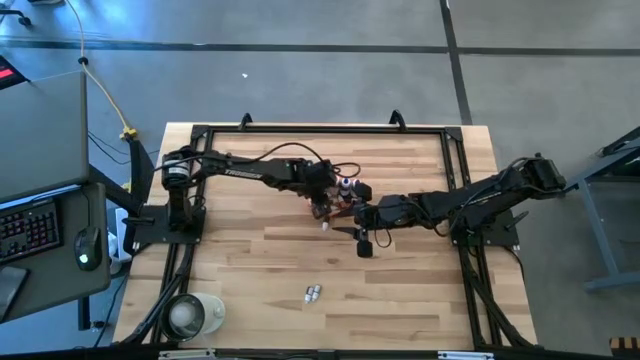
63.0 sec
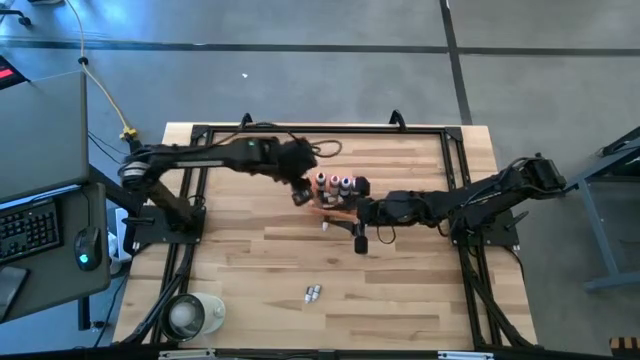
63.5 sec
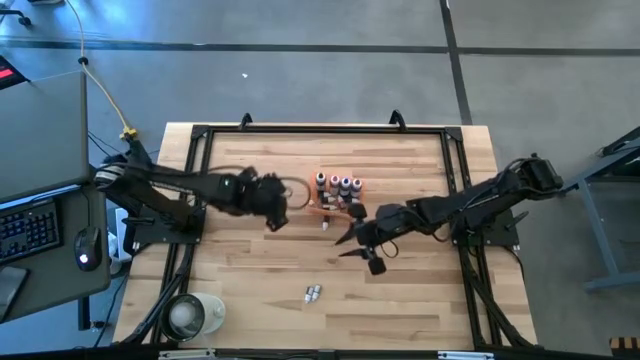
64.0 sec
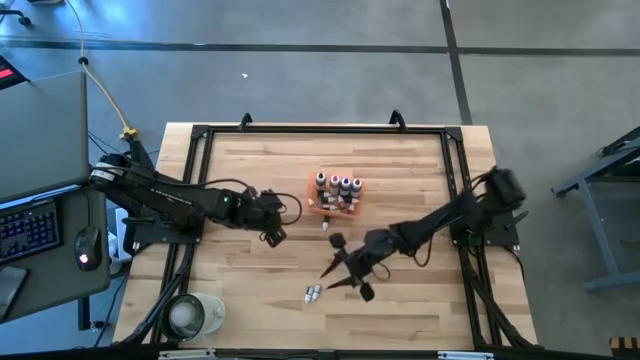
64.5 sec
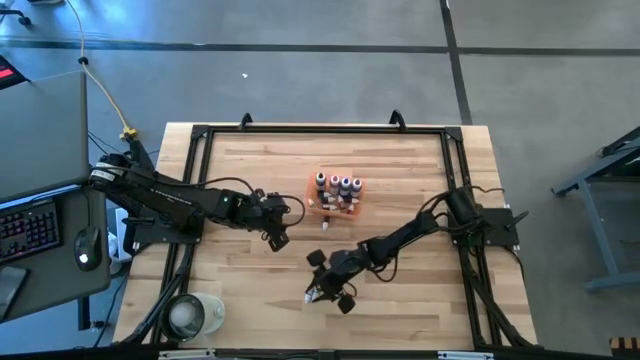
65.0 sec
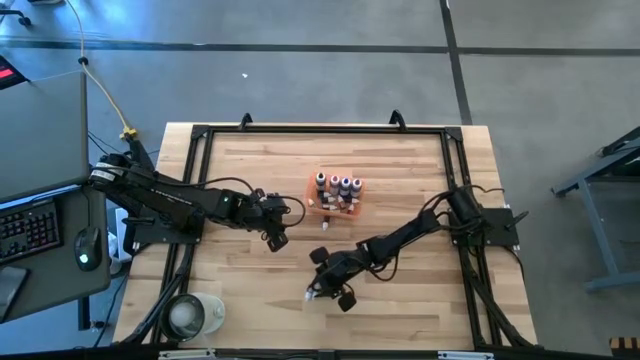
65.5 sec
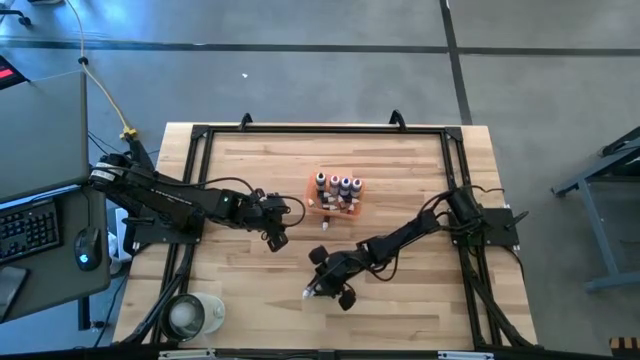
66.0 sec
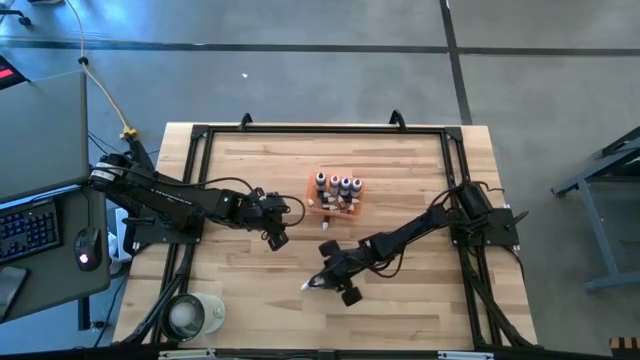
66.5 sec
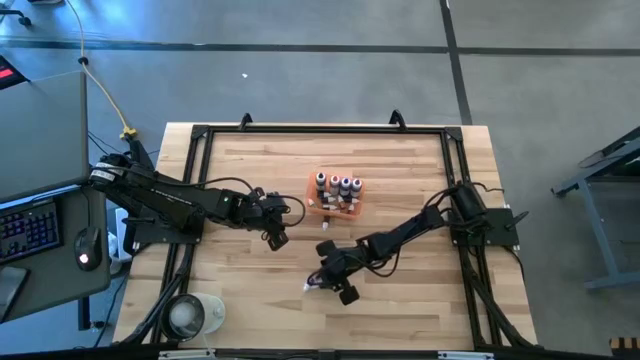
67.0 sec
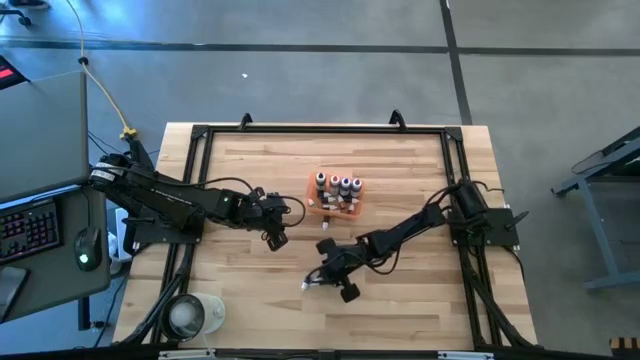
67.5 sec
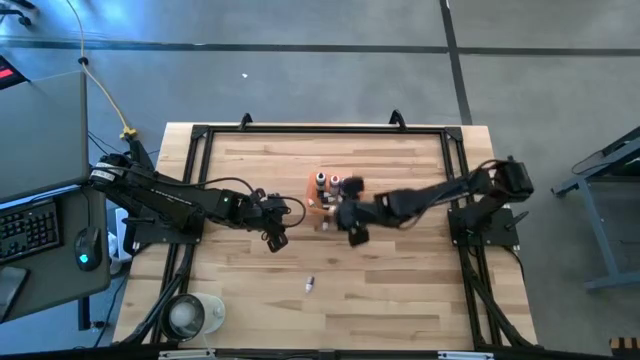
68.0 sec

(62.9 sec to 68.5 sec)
Task: Pick & Place food coloring
Put the small green food coloring bottle into the orange bin

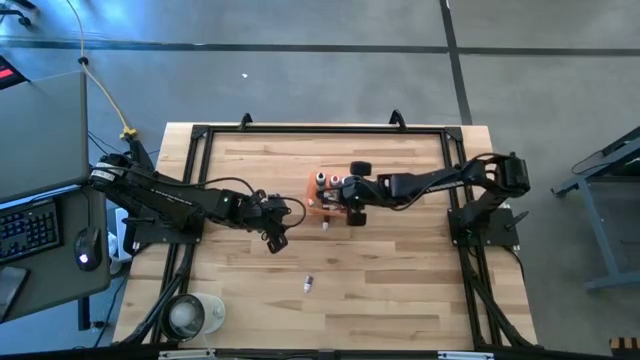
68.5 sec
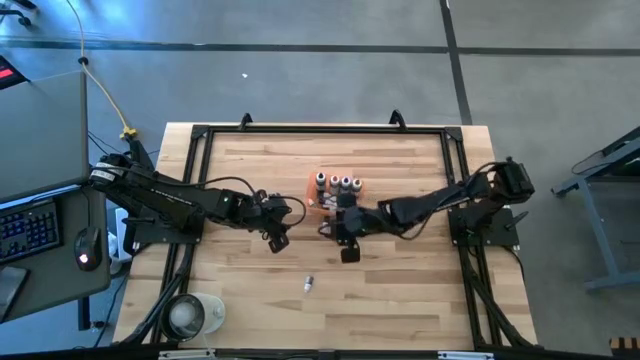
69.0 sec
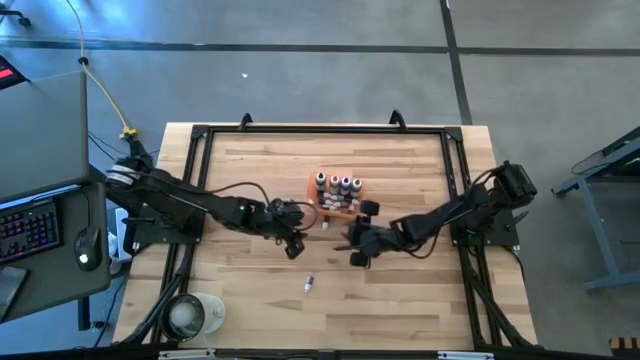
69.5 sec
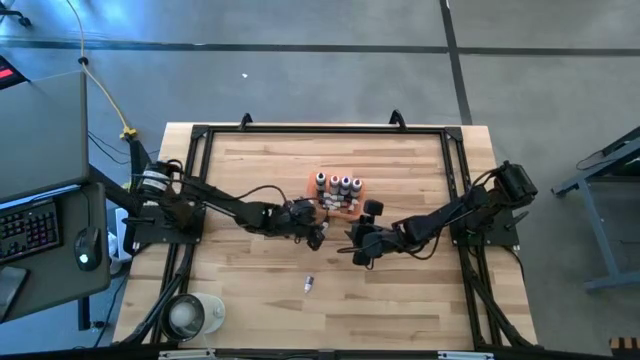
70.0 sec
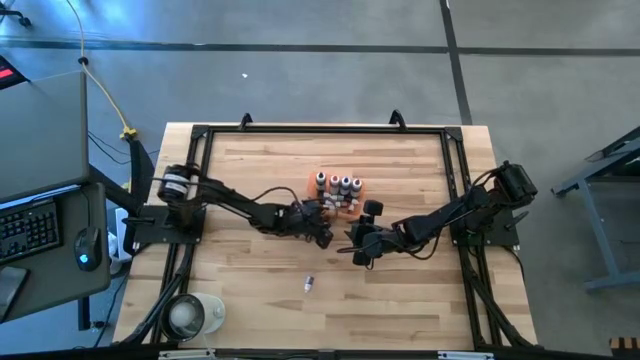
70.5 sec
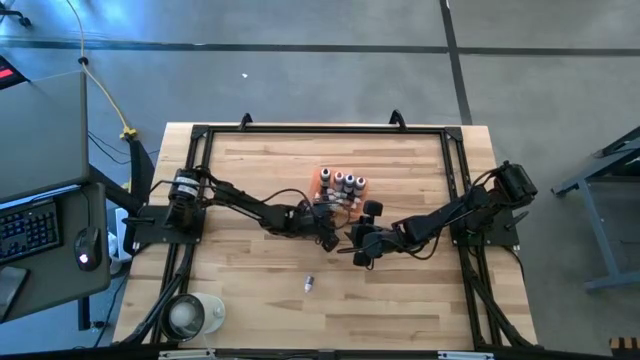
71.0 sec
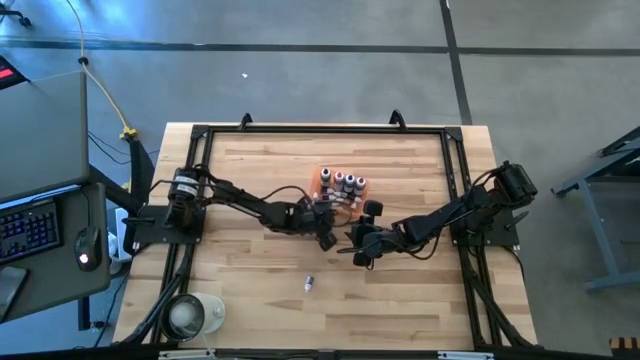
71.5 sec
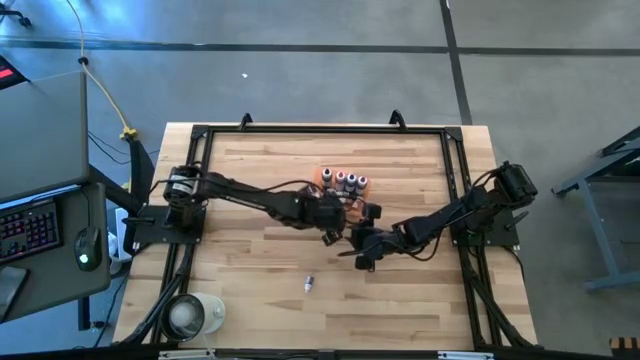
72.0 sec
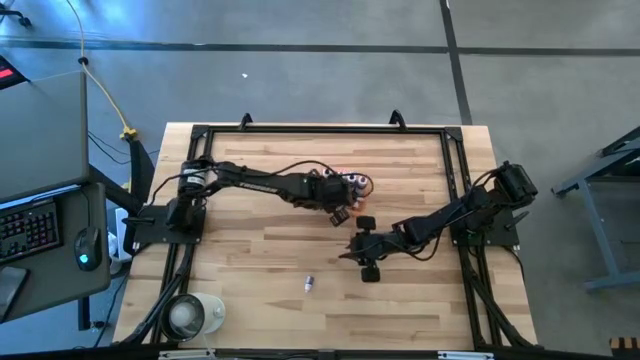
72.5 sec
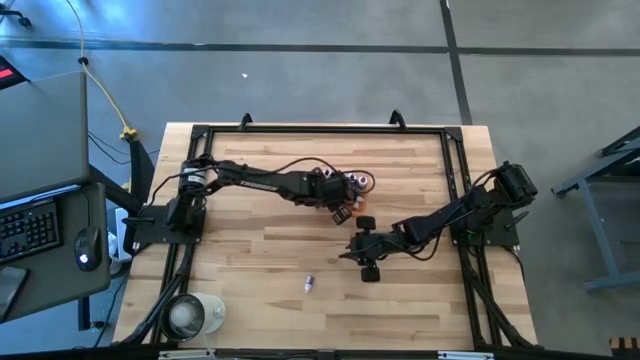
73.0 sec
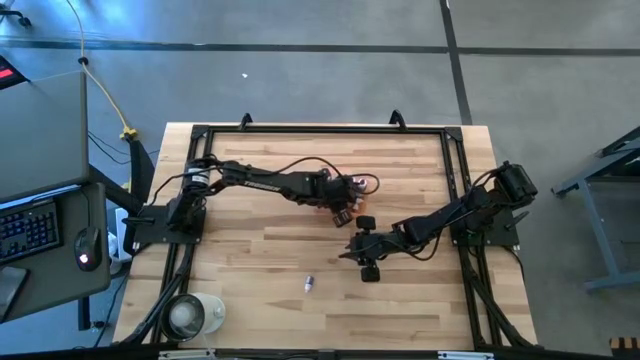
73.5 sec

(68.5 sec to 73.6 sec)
Put the small black food coloring bottle into the orange bin

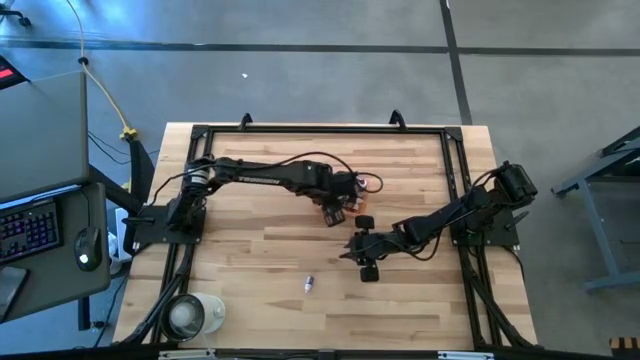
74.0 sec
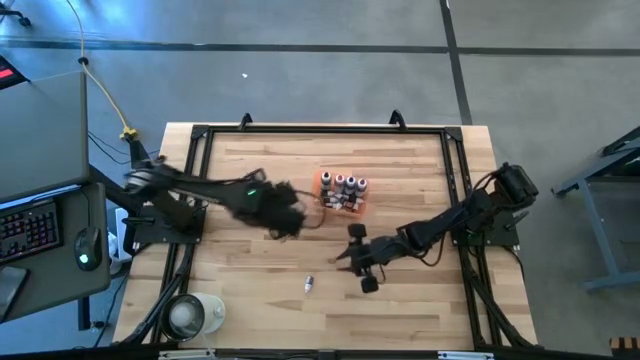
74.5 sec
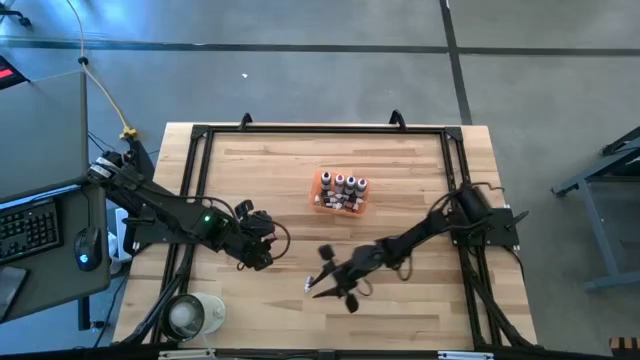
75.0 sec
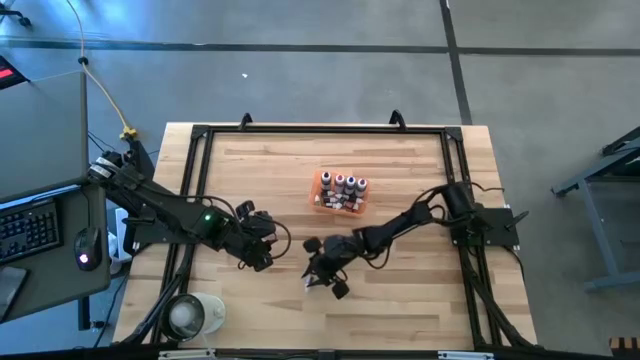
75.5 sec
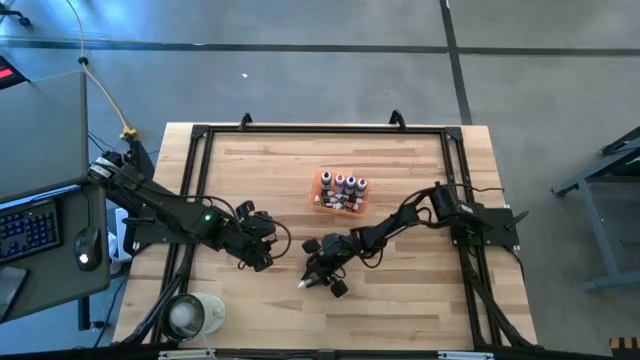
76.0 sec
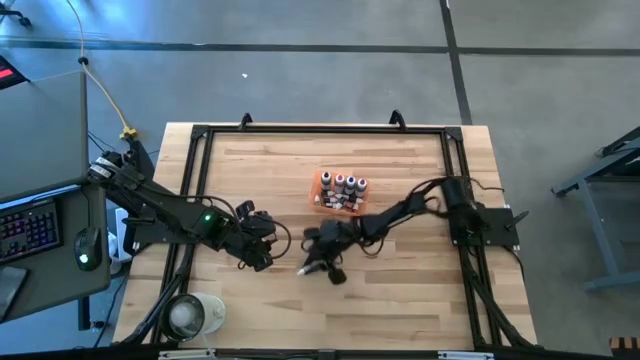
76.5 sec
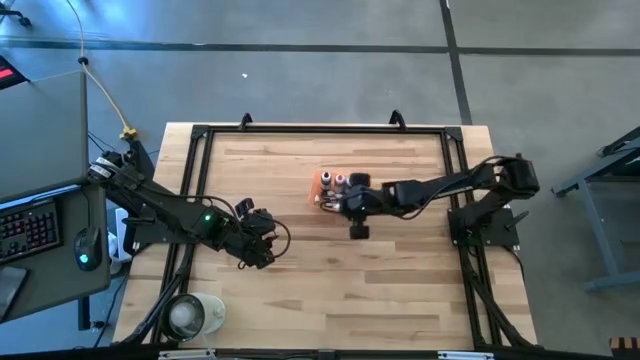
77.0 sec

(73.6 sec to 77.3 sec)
Put the small purple food coloring bottle into the orange bin

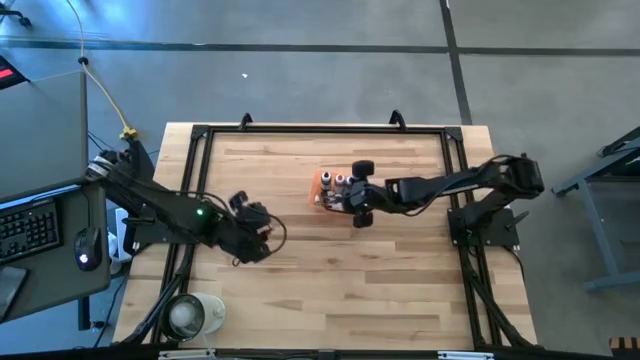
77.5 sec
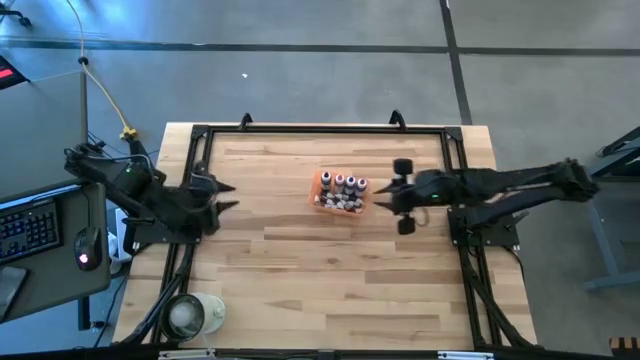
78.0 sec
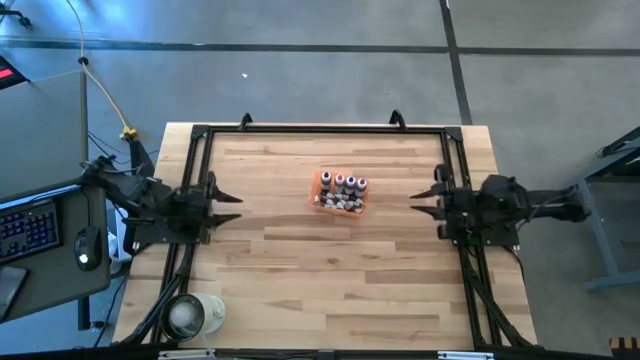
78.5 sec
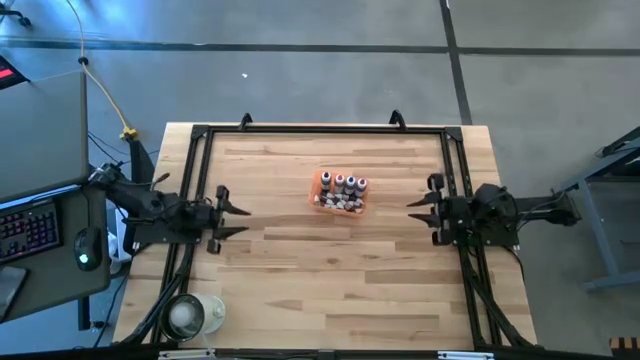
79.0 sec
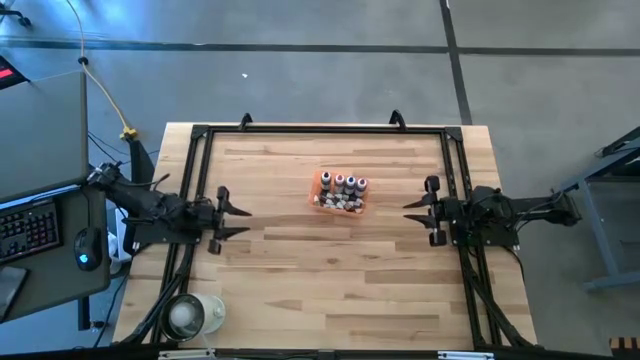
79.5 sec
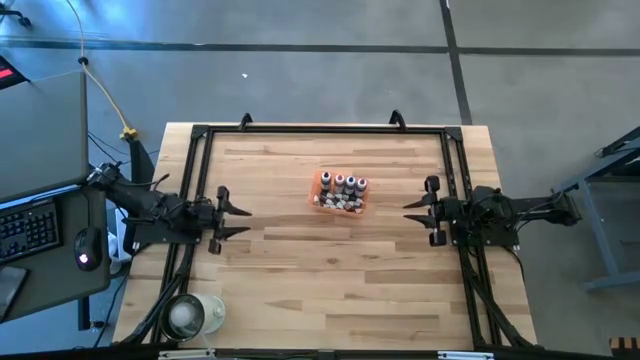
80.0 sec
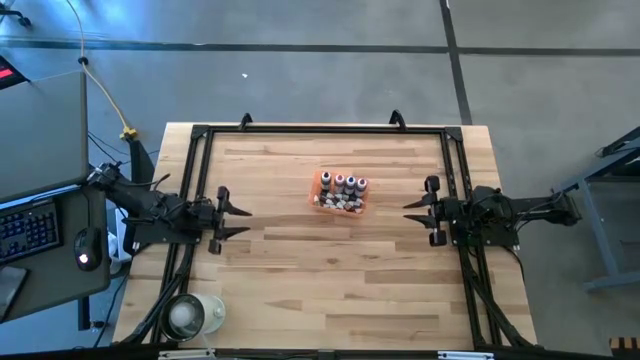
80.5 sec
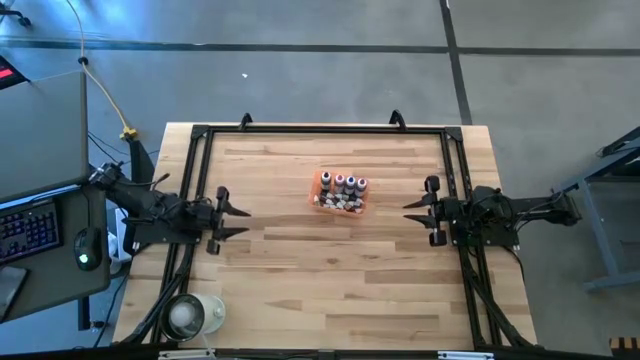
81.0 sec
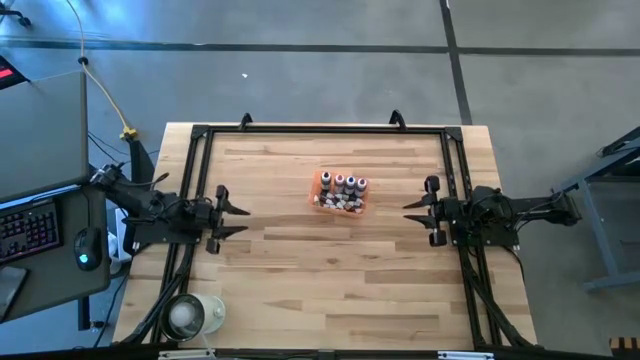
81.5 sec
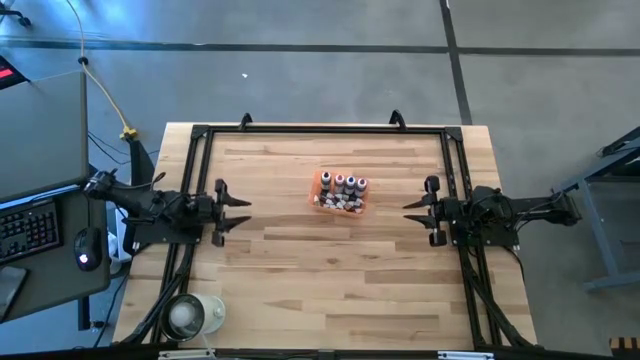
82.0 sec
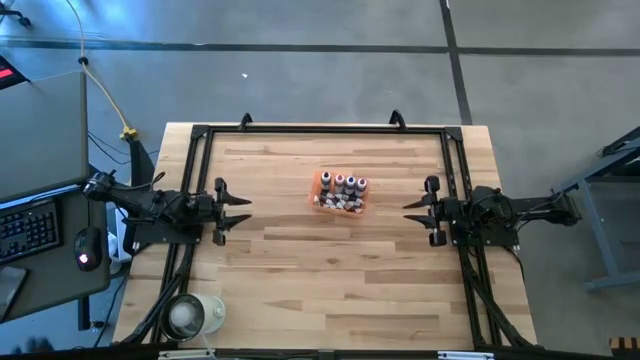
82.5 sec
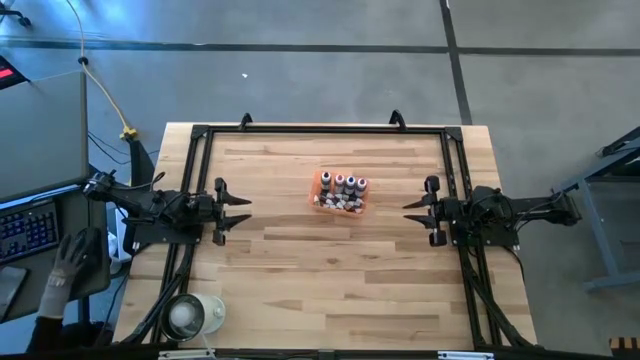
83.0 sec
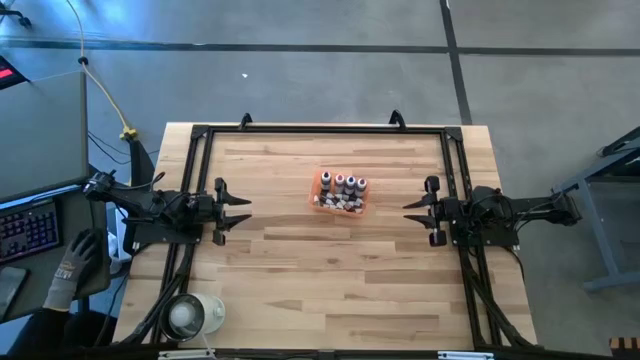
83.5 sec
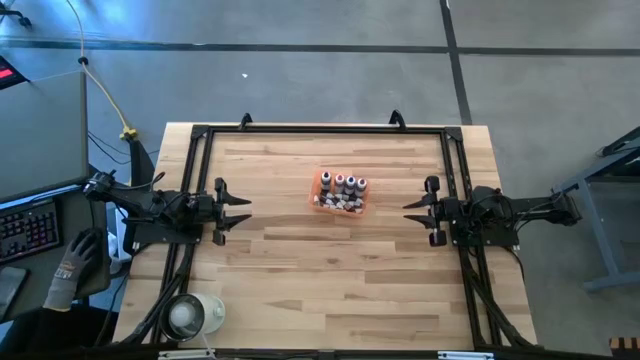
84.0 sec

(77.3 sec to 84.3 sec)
Return to Home Position
